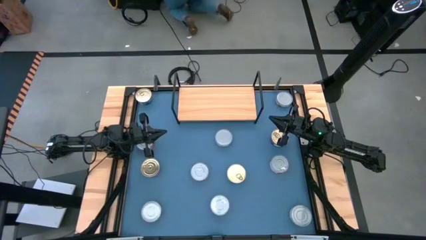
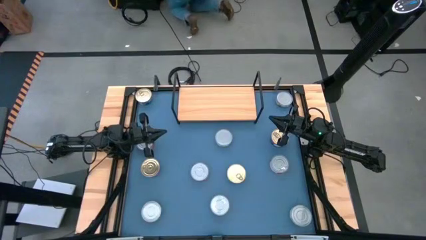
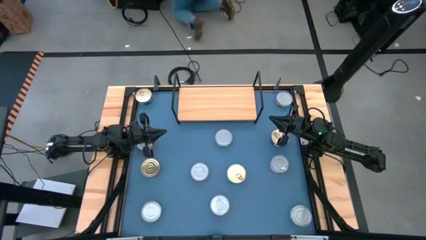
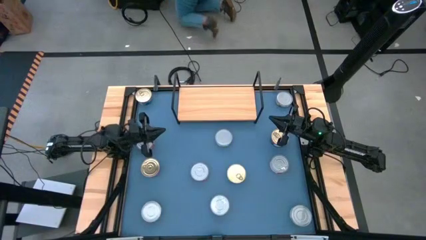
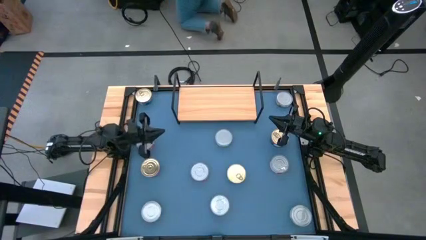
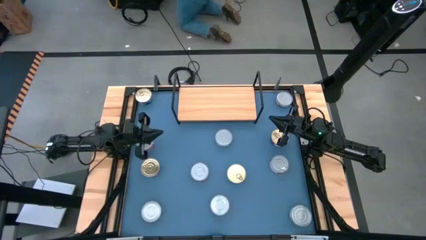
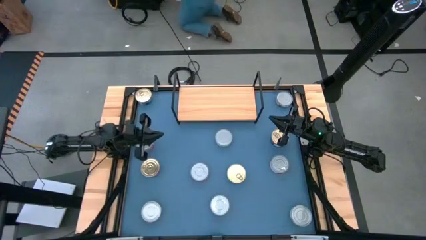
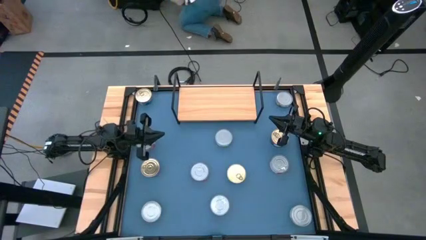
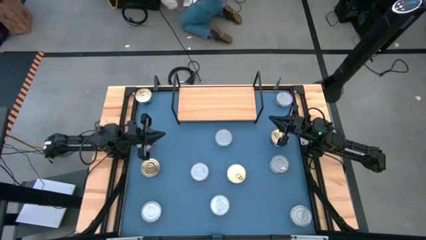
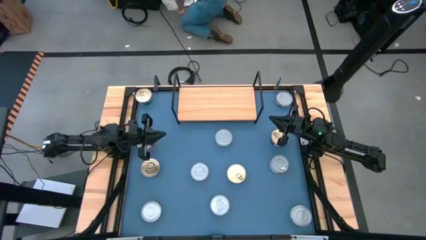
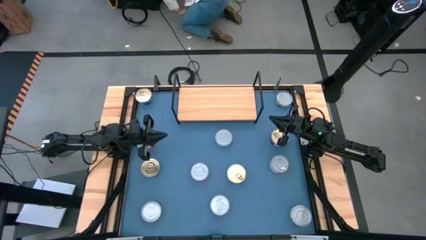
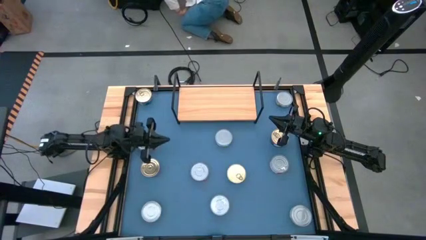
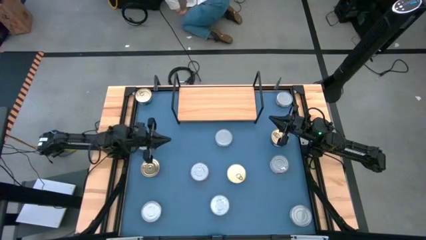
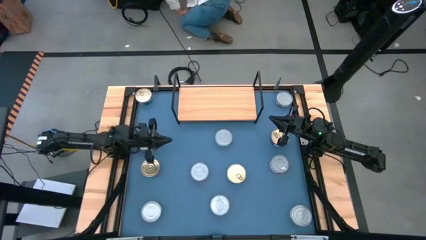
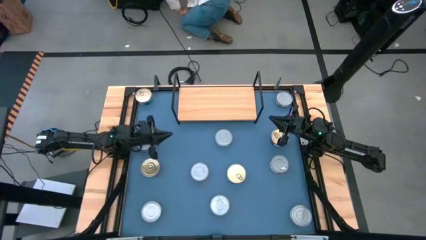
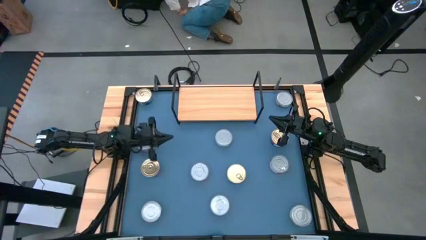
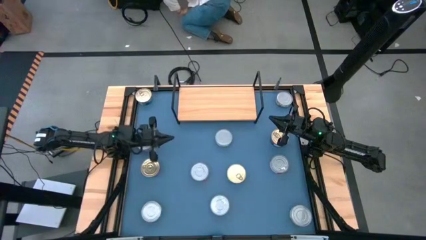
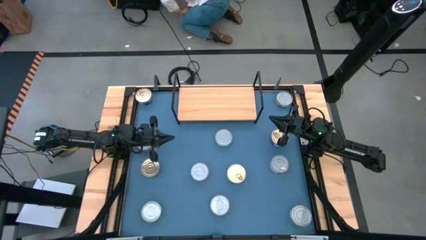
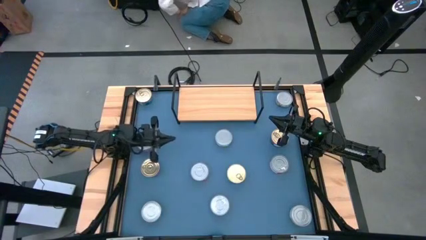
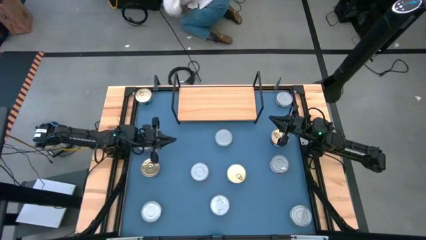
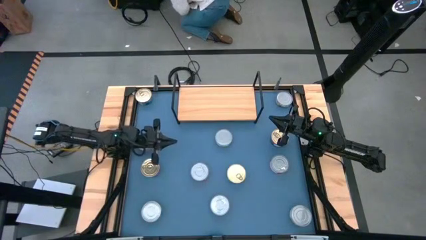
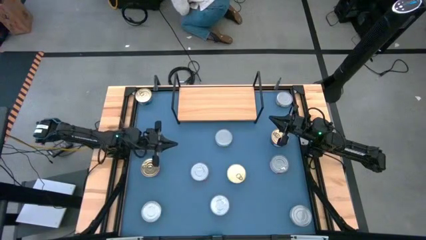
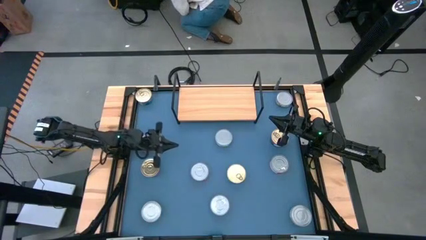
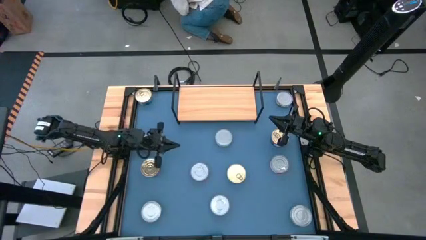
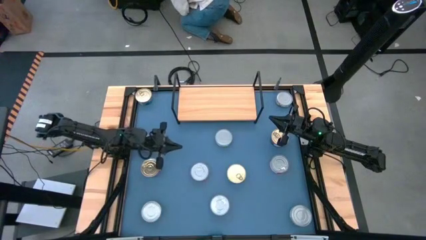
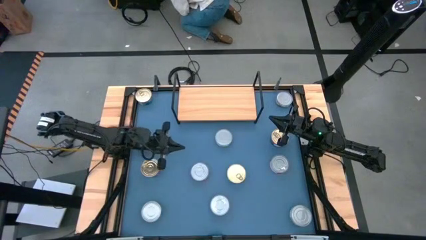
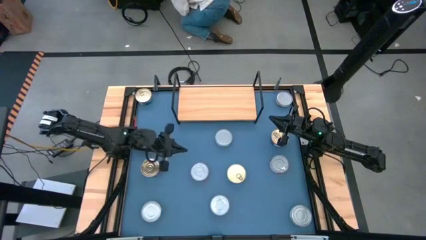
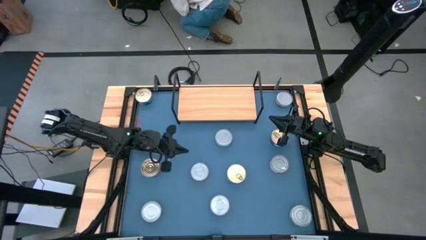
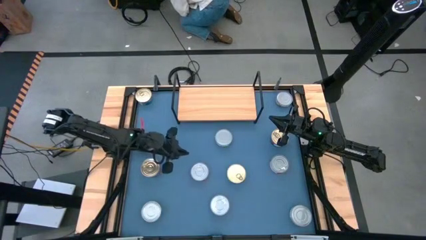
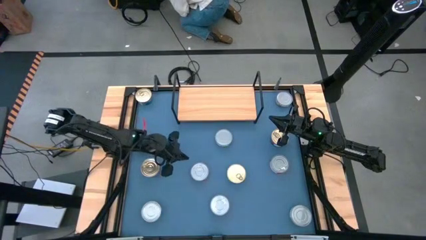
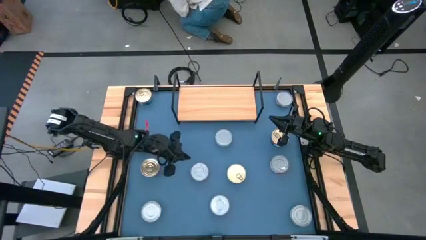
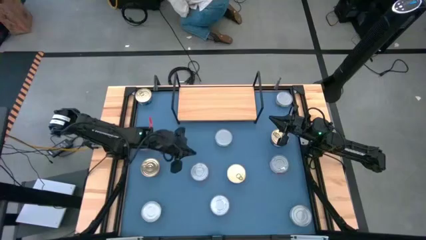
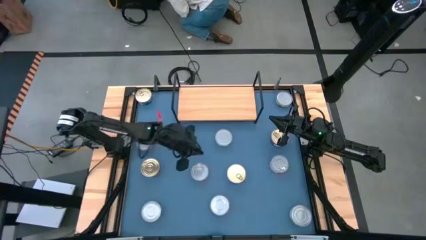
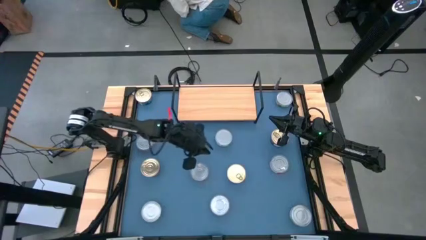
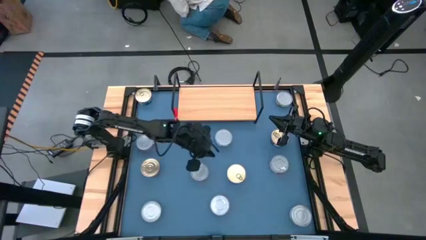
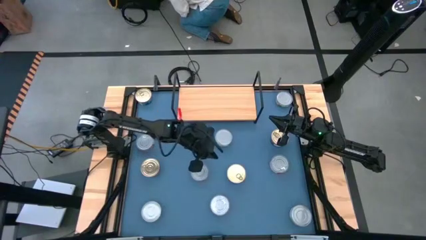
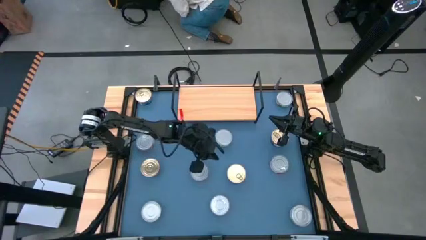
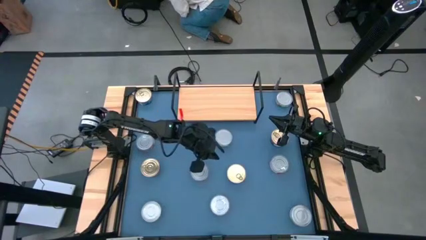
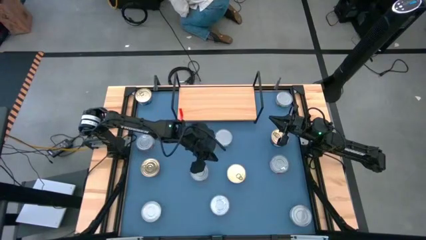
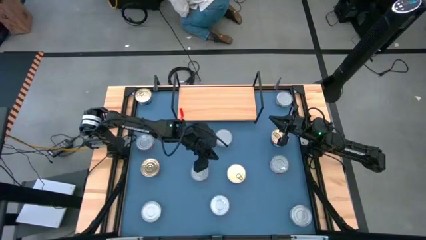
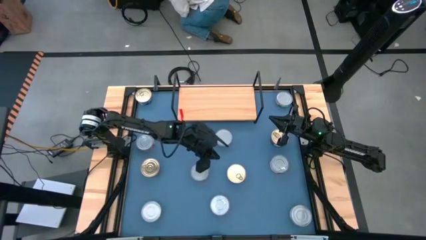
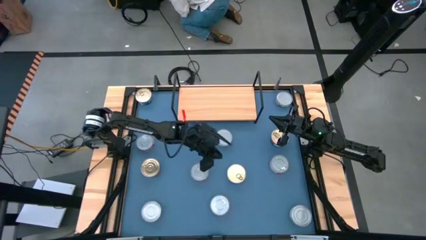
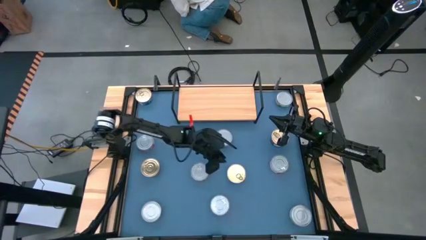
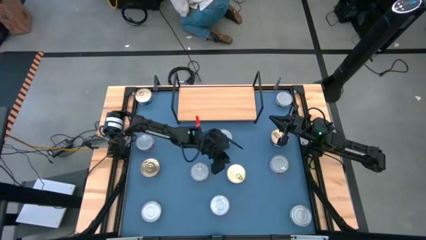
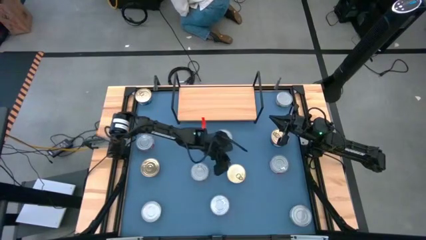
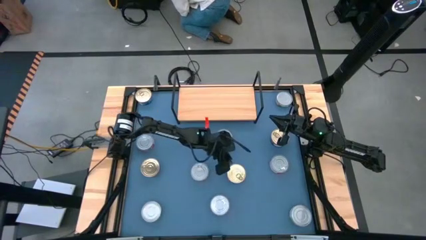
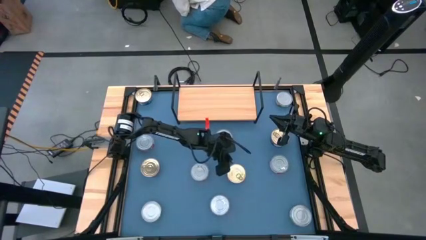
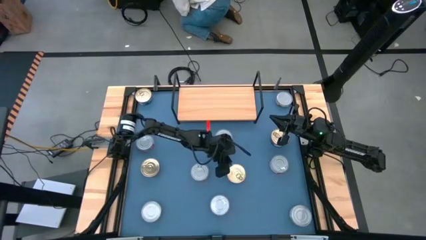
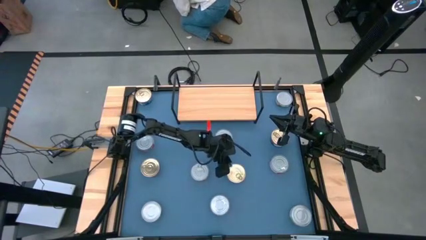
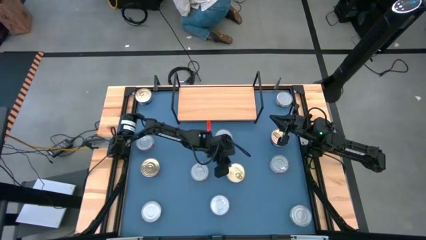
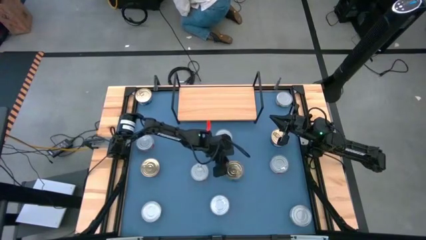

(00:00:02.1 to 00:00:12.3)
Task: Stack canned seafood by type on shelf
Put the blue tuna can on the shelf
